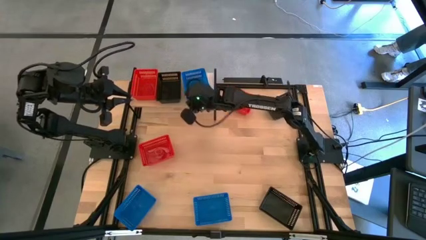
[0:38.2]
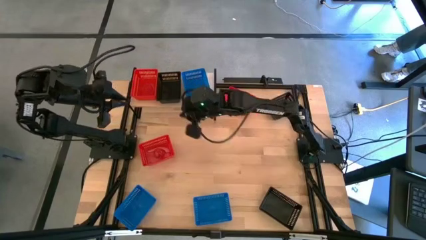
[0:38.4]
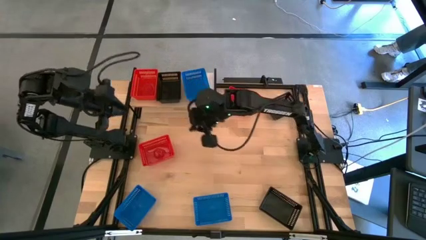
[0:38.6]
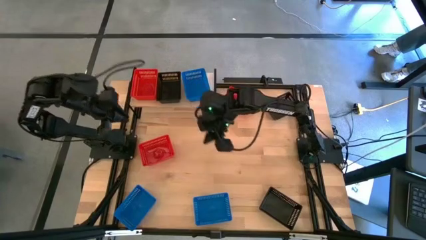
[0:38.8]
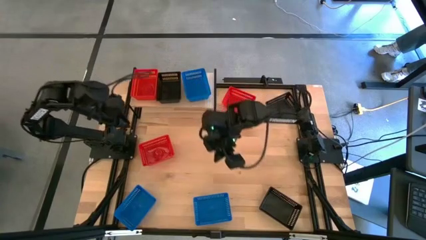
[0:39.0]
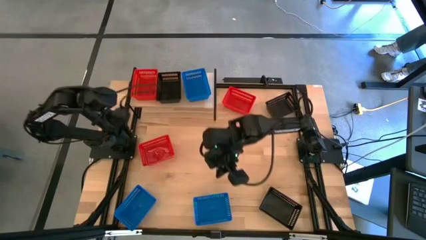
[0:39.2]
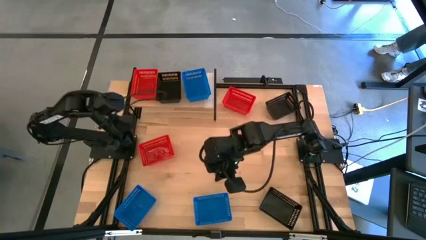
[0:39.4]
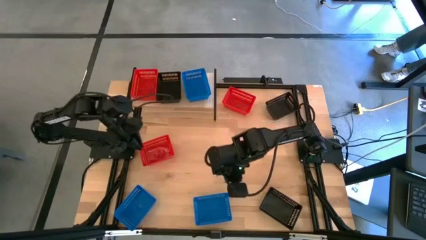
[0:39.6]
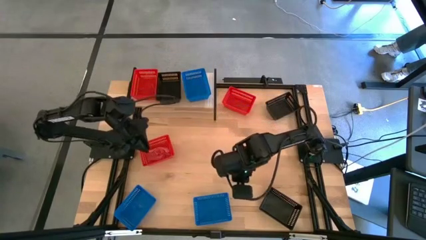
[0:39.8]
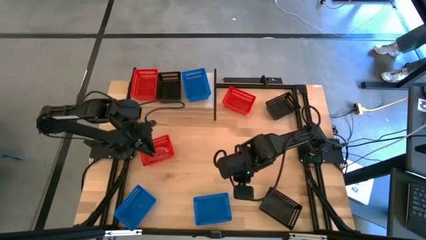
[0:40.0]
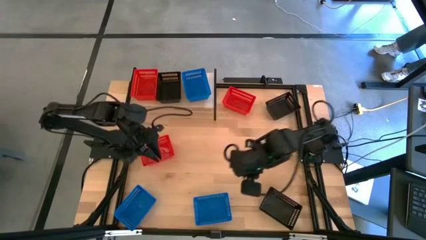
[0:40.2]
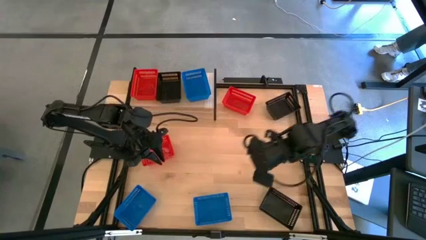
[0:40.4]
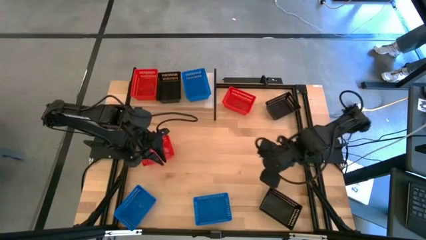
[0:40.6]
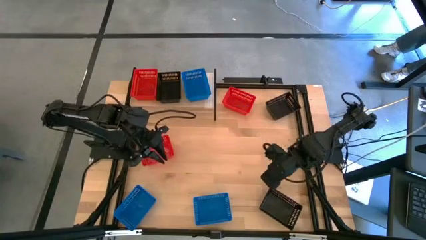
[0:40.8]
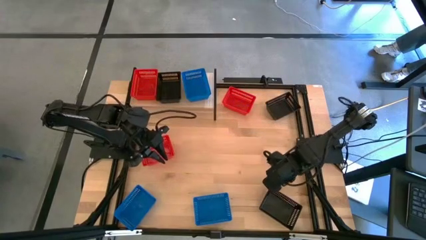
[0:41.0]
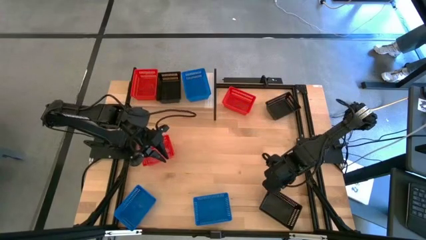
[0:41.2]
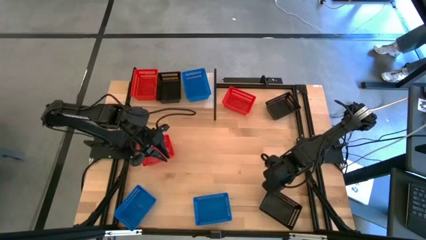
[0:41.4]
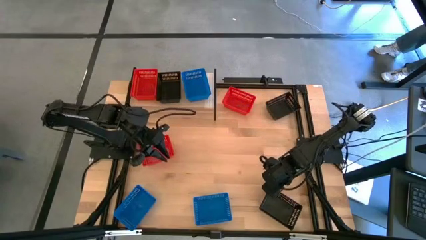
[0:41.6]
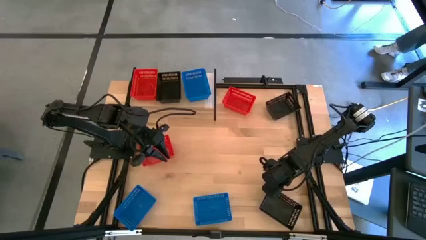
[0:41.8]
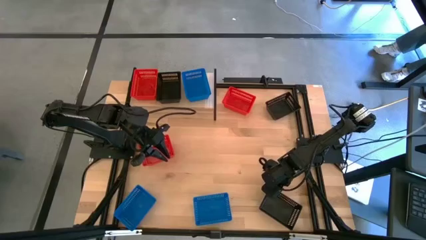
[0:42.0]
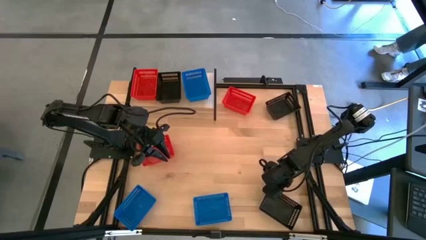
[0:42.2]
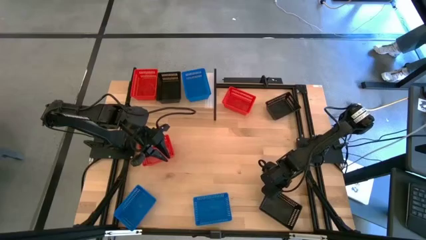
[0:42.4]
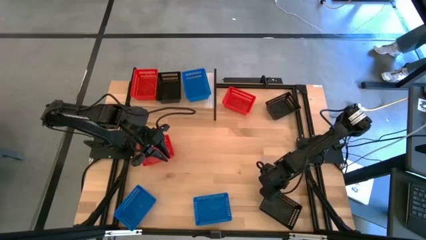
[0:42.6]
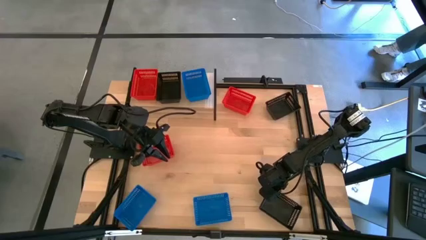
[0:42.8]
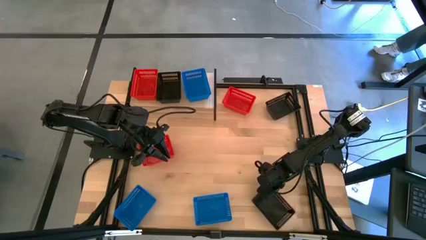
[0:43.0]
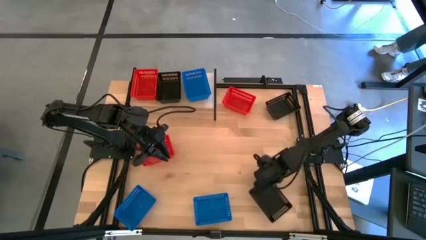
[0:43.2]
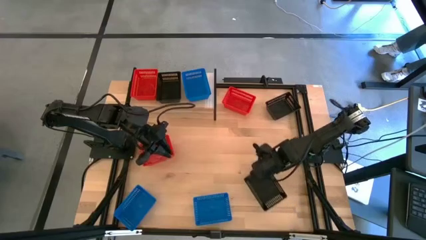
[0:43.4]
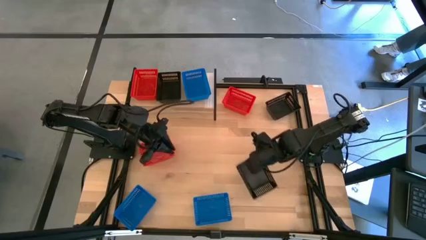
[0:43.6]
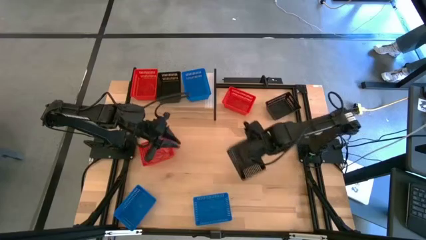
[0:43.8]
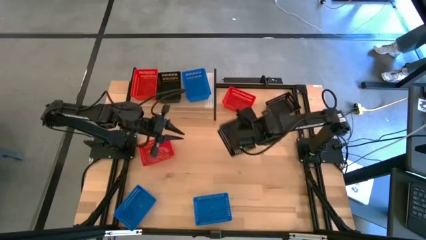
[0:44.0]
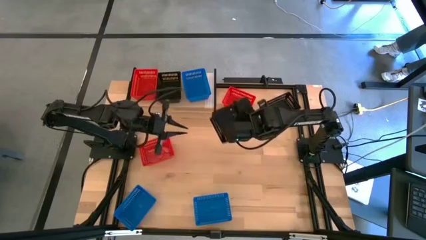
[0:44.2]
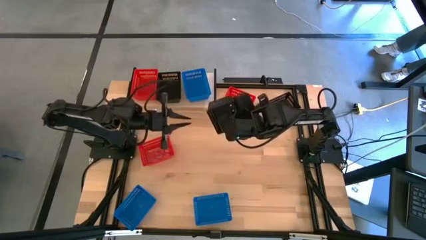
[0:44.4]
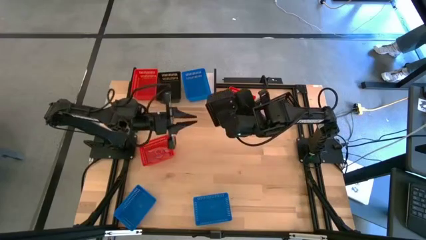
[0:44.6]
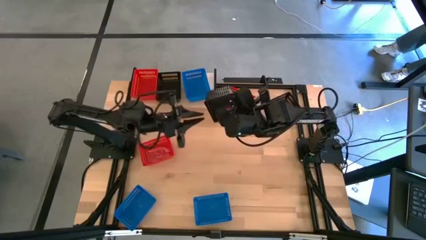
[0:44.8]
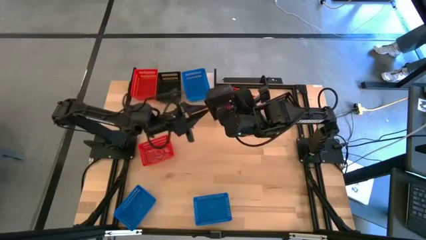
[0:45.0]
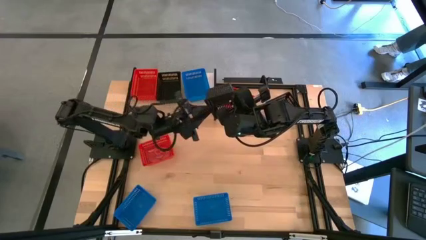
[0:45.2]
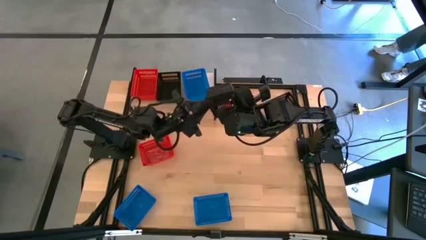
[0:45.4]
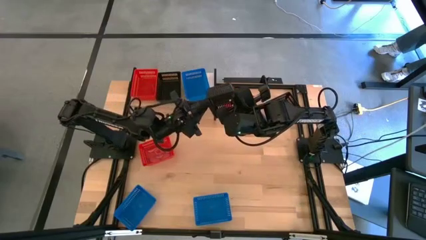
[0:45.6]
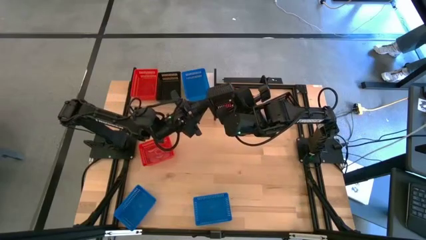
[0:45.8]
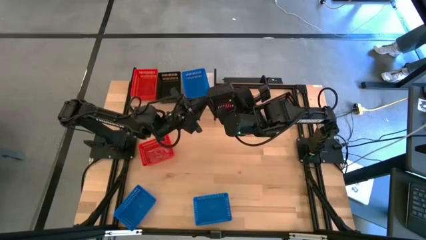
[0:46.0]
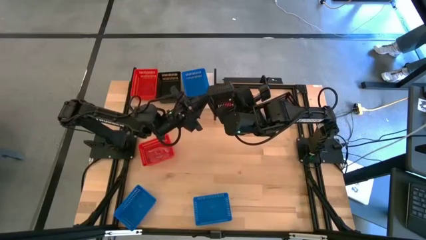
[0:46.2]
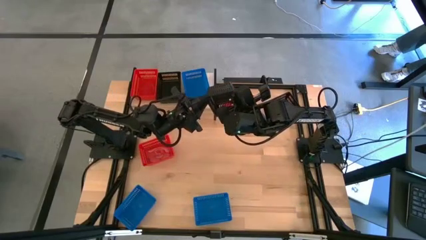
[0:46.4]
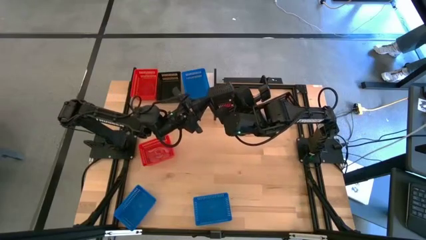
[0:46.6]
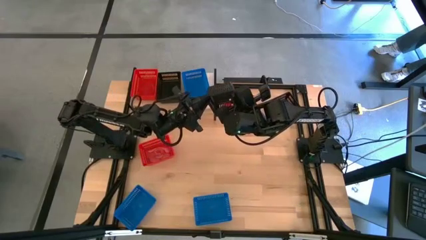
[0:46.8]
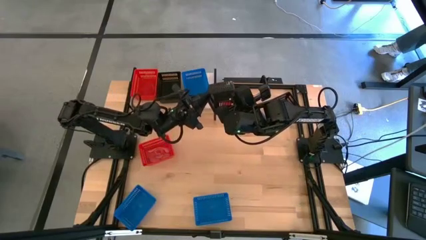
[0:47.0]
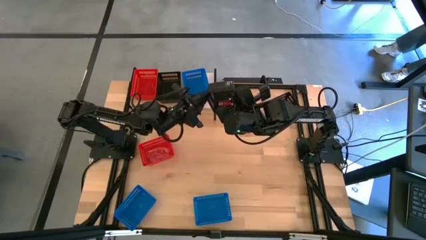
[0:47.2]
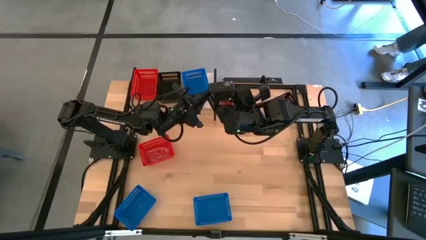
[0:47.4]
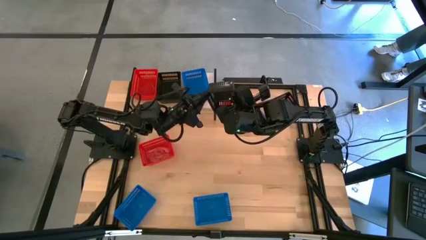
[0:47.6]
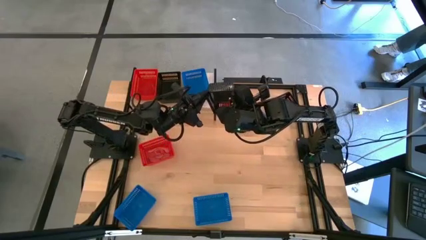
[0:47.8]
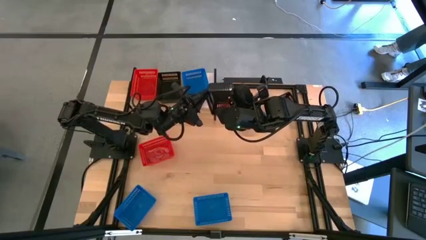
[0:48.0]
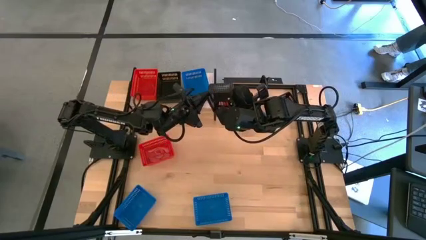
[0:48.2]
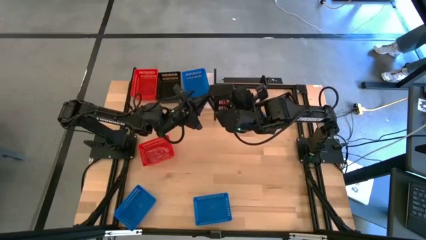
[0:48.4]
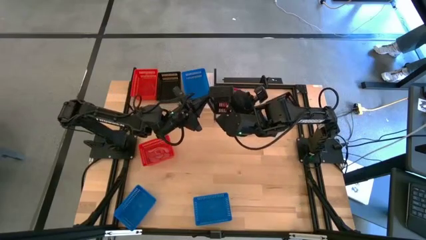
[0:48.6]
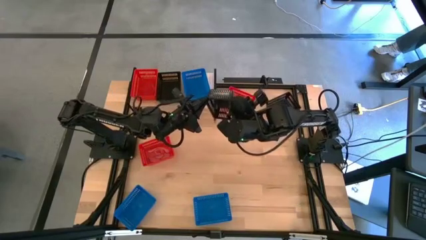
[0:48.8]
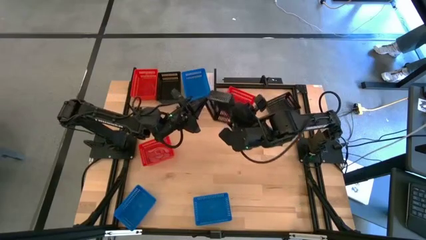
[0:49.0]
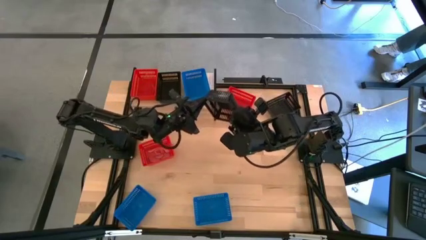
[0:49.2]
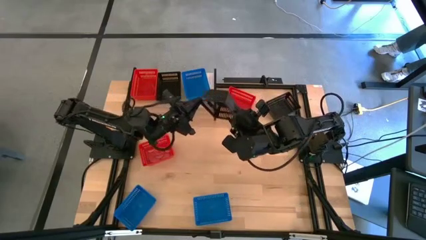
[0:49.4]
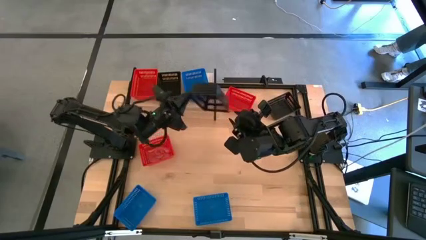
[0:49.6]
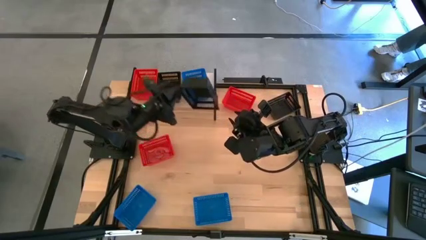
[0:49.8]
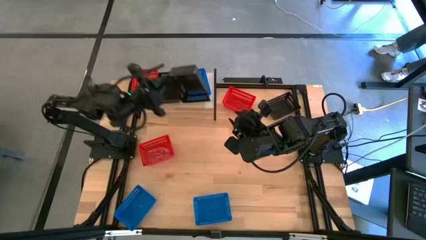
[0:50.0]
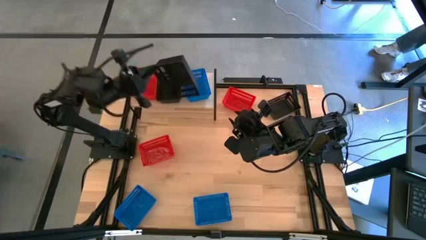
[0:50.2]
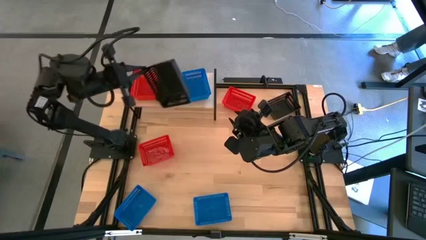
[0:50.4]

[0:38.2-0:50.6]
Task: Stack baskets on shelf by color
Stack the bottom black bin on the other black bin on the shelf
